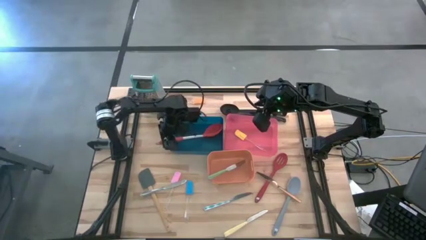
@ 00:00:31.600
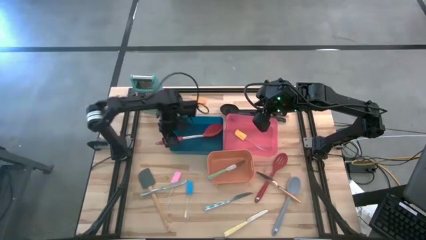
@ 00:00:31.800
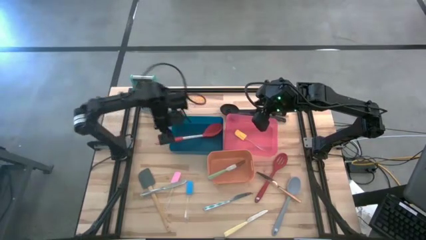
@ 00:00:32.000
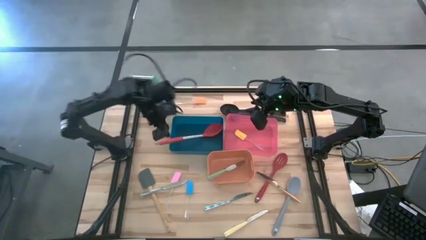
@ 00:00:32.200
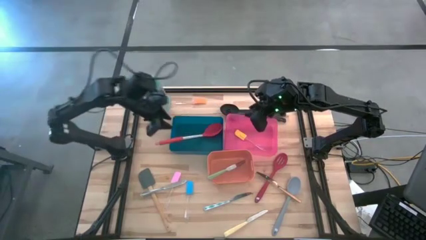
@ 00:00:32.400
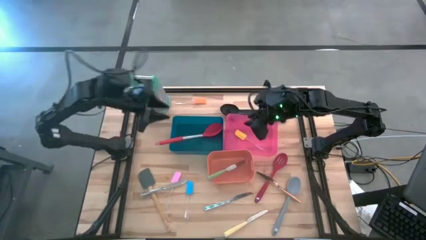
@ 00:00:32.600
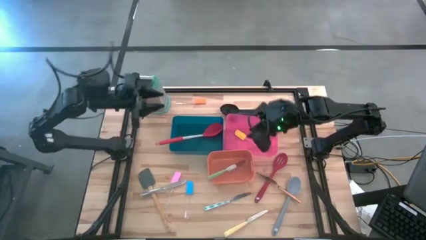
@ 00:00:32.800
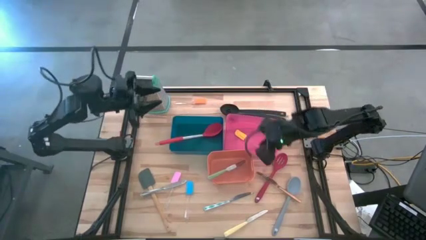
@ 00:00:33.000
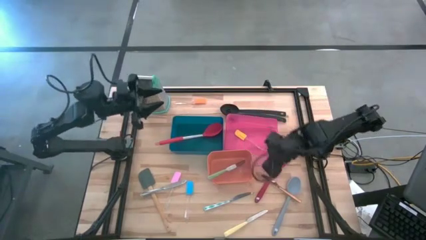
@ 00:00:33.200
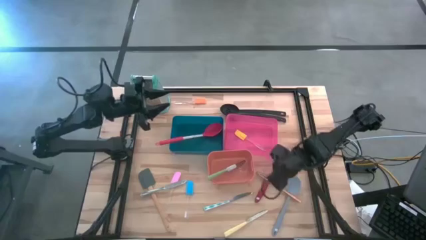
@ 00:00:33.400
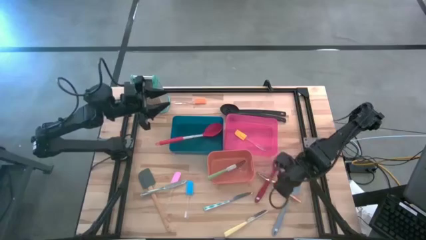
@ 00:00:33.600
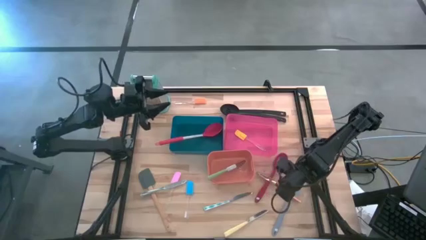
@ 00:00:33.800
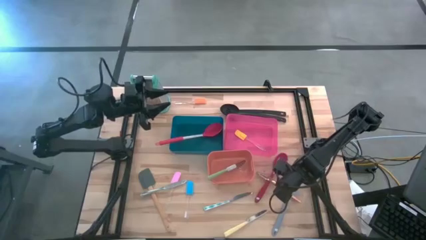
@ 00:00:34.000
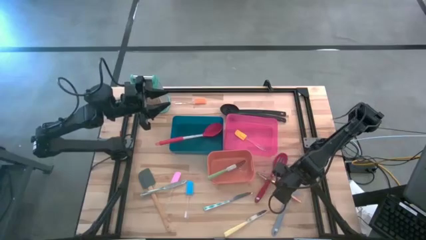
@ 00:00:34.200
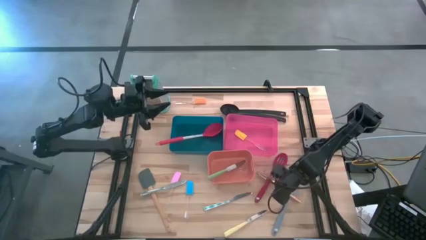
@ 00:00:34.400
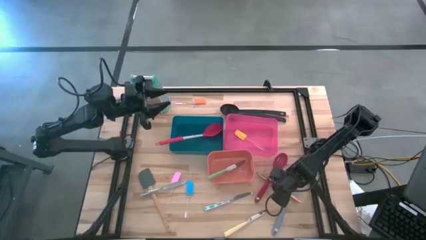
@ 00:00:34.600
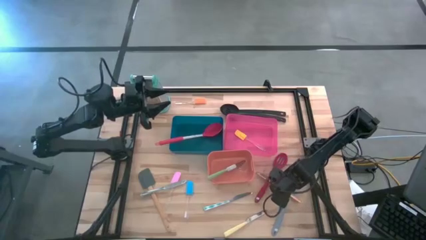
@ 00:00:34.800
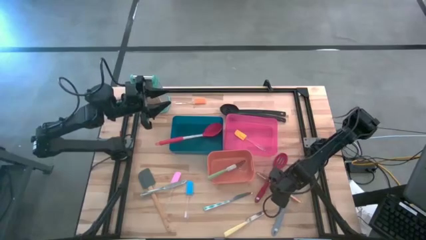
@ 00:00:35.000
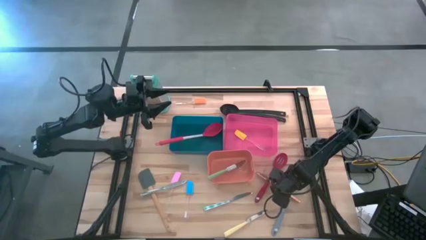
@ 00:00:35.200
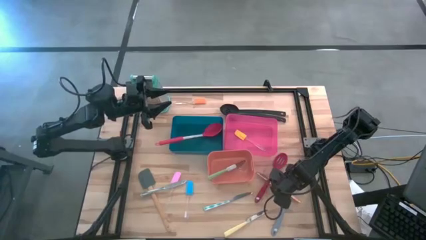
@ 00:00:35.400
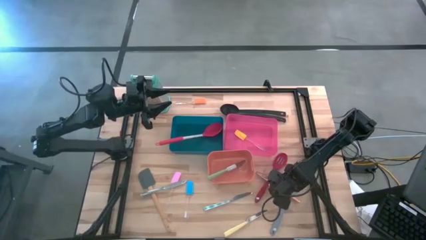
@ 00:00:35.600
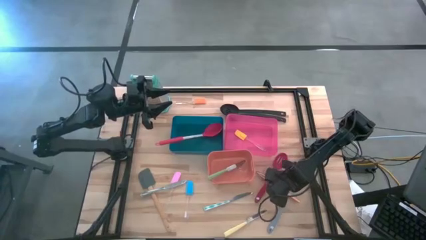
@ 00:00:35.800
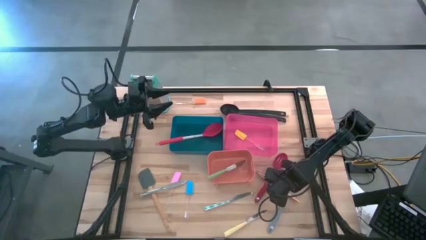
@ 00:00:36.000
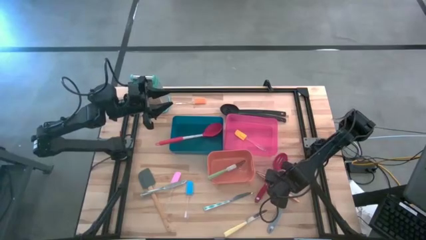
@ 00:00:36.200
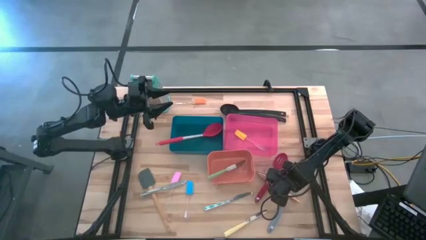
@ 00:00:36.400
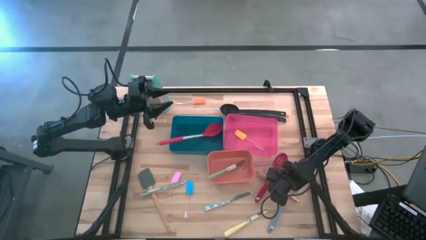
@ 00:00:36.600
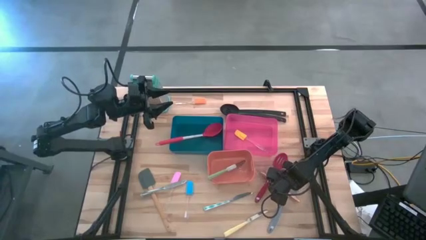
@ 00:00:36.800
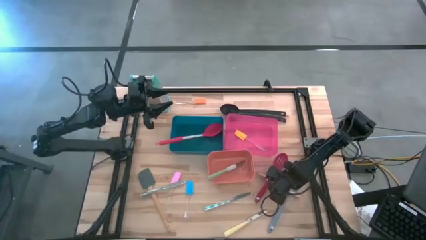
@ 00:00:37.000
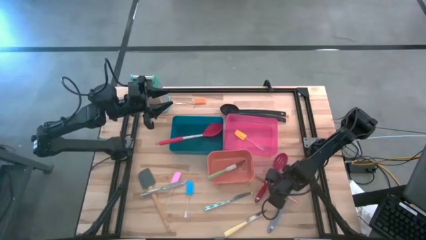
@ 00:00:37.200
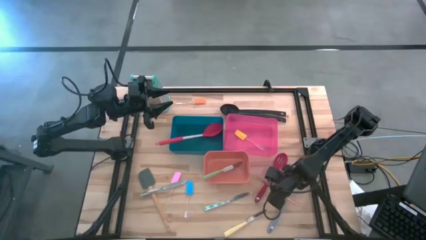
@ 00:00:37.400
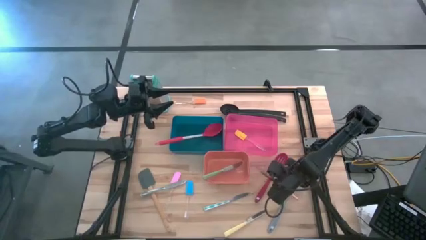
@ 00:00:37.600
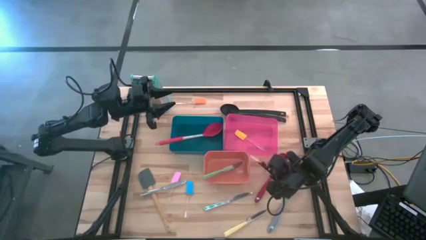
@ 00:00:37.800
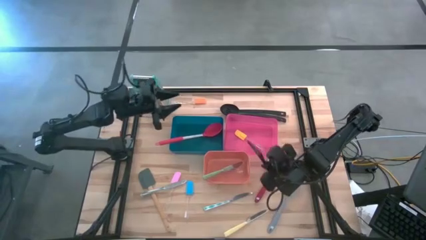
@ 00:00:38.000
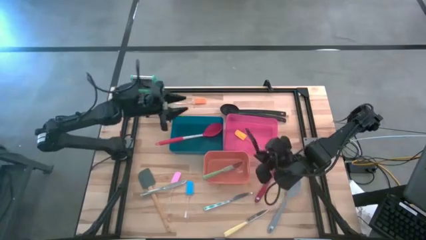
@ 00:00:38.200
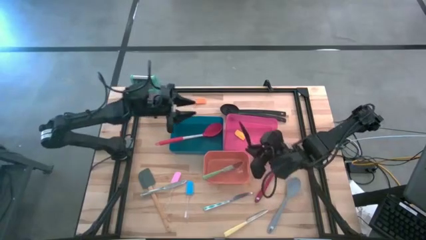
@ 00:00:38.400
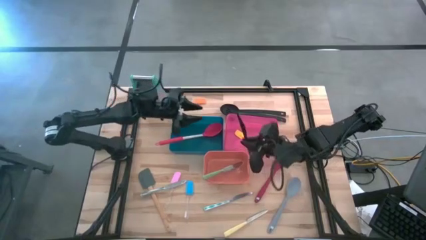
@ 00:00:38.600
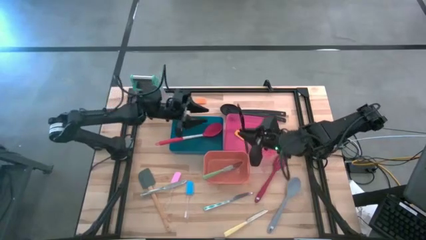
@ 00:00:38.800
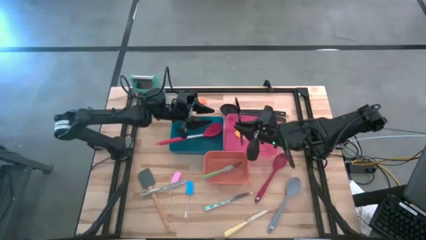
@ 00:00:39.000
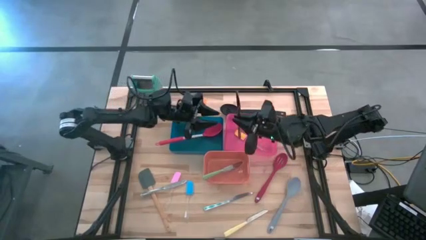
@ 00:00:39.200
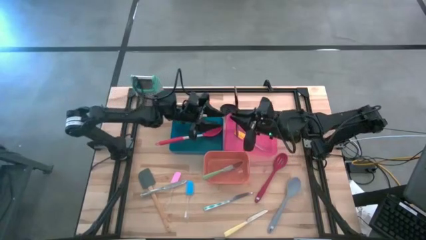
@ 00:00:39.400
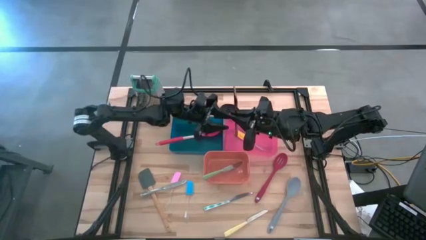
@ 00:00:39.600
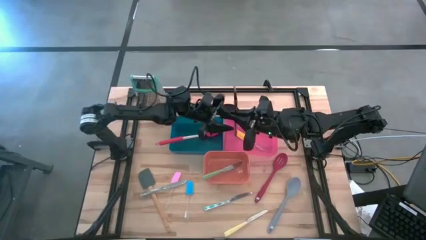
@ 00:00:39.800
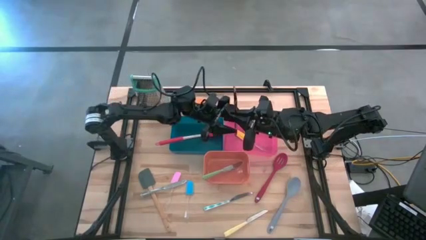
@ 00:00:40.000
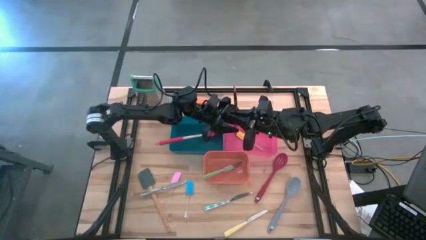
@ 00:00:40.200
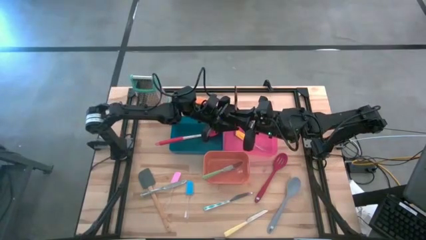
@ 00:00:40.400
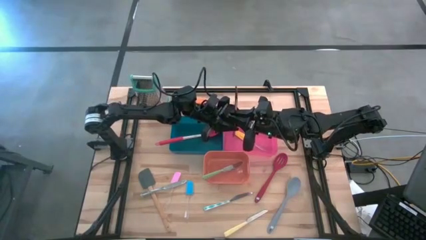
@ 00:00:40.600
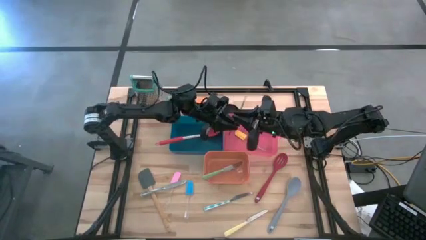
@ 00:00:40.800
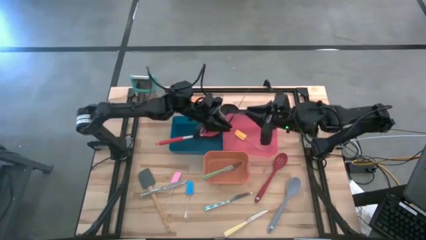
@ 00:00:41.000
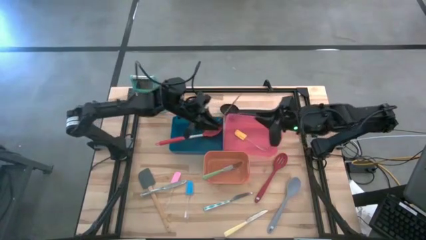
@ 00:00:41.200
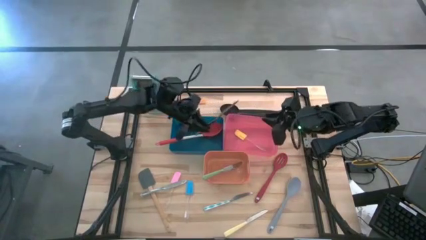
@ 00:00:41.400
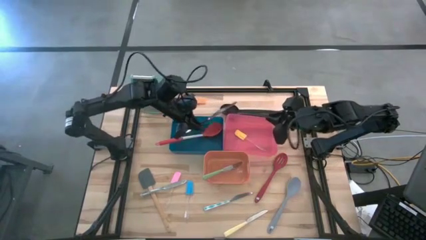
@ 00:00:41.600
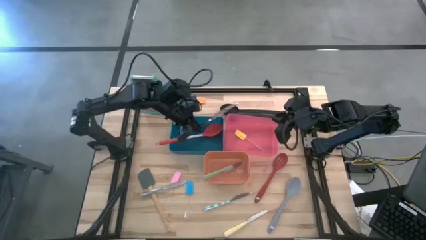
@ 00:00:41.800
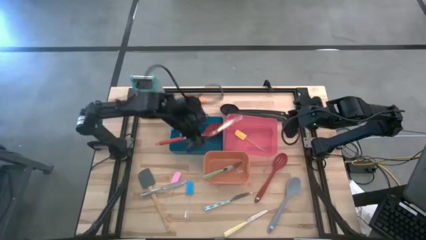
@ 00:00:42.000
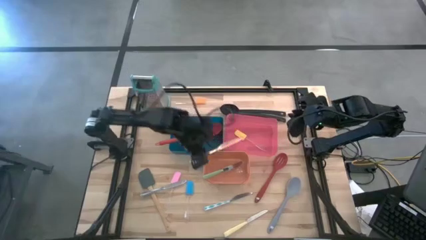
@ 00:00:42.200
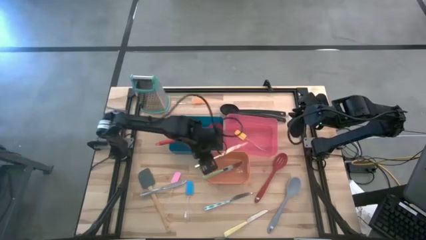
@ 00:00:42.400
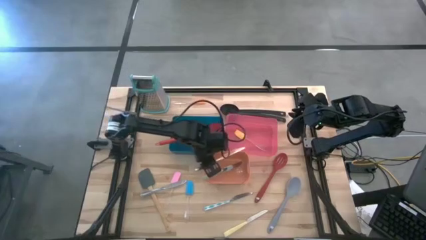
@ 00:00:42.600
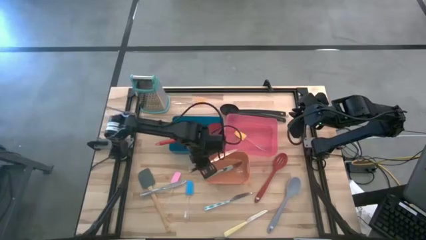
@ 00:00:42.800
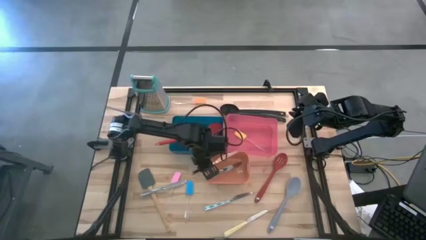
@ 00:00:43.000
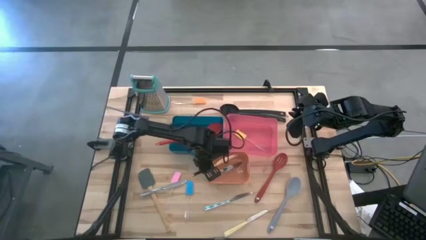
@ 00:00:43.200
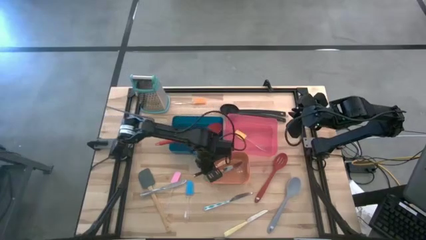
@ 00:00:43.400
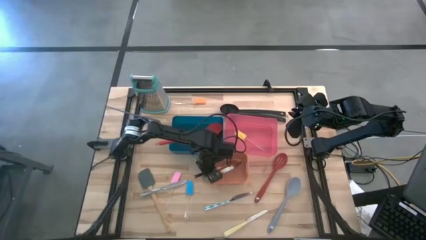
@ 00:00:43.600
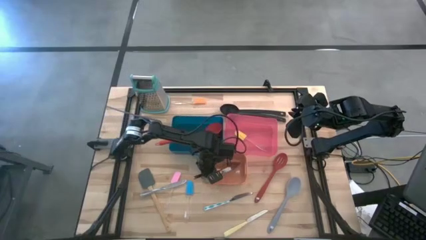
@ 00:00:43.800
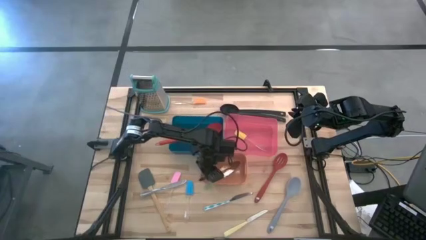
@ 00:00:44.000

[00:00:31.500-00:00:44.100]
Task: Pick & Place Kitchen Items
Put the gold knife into the orange bin

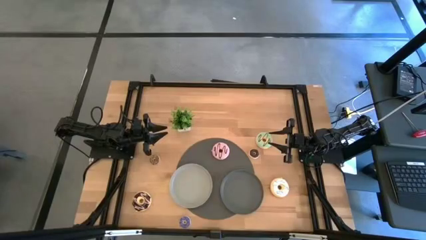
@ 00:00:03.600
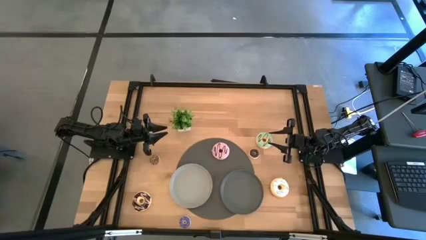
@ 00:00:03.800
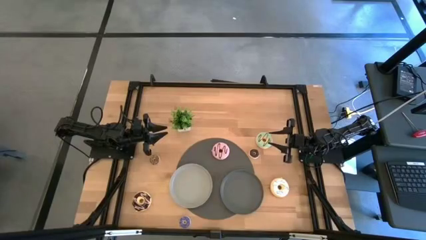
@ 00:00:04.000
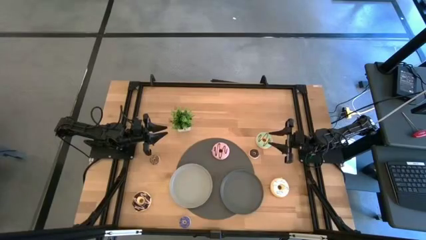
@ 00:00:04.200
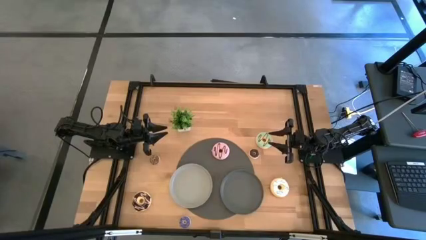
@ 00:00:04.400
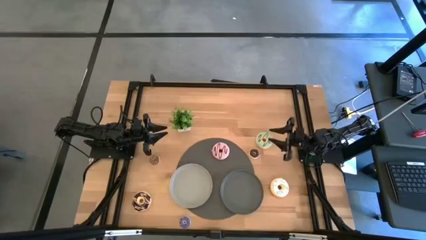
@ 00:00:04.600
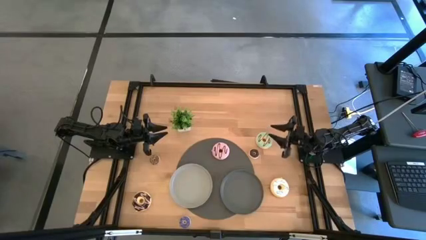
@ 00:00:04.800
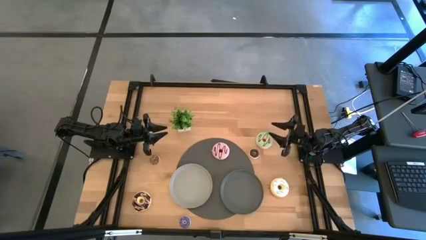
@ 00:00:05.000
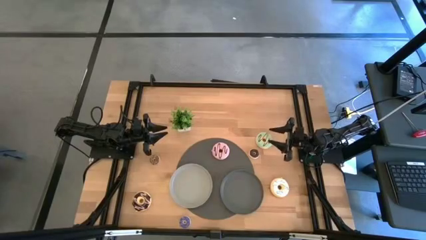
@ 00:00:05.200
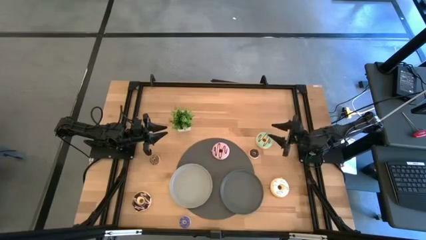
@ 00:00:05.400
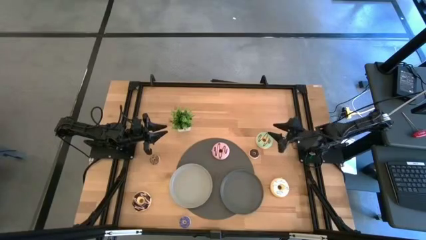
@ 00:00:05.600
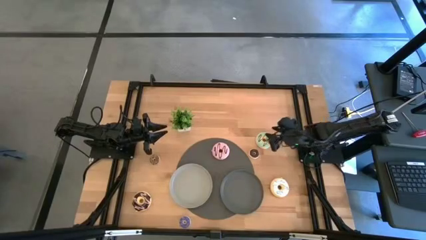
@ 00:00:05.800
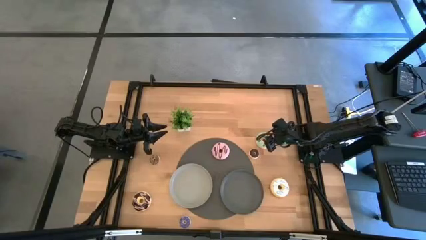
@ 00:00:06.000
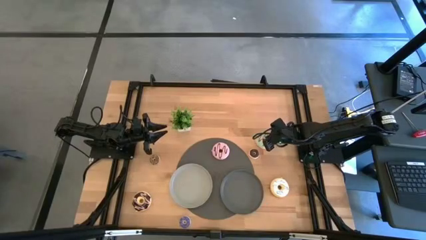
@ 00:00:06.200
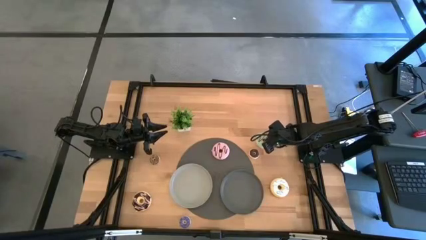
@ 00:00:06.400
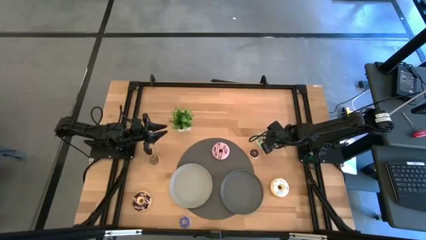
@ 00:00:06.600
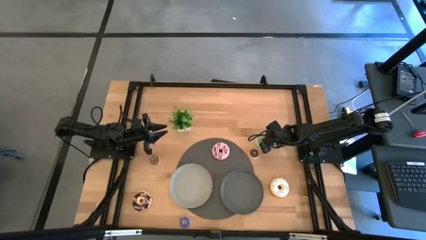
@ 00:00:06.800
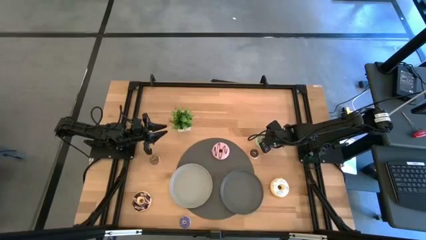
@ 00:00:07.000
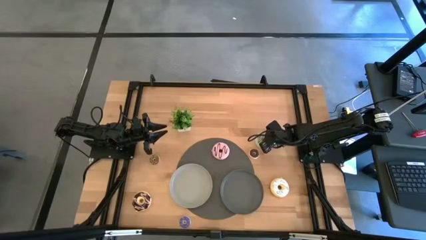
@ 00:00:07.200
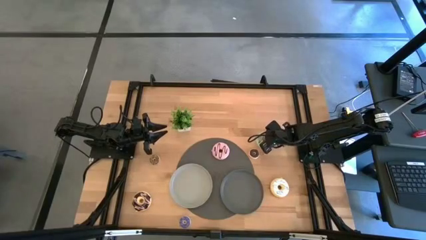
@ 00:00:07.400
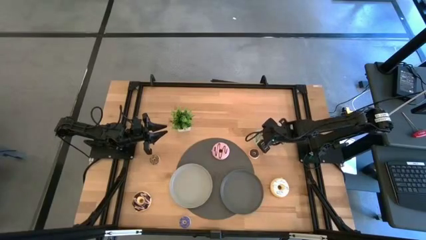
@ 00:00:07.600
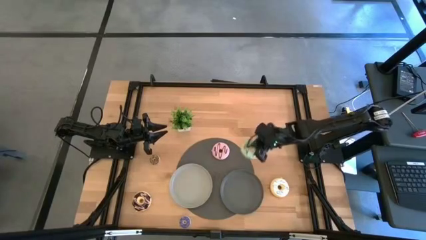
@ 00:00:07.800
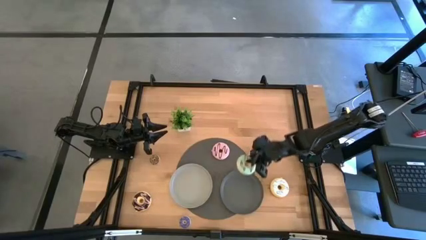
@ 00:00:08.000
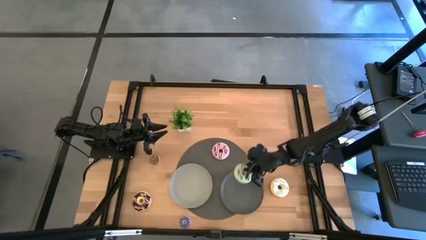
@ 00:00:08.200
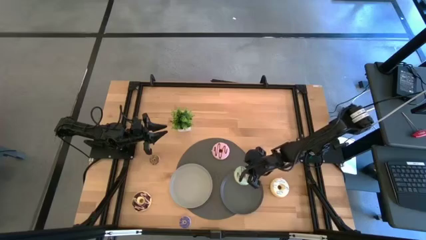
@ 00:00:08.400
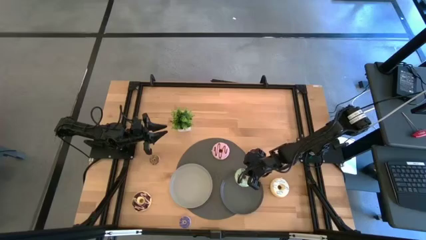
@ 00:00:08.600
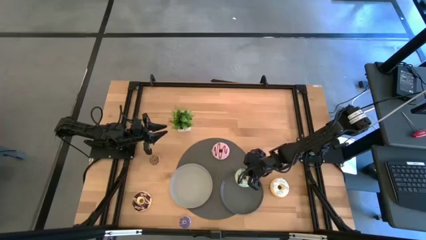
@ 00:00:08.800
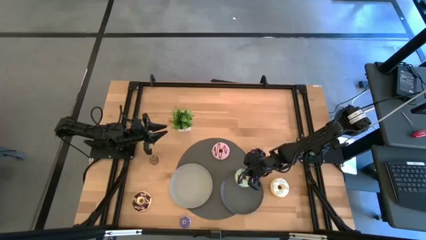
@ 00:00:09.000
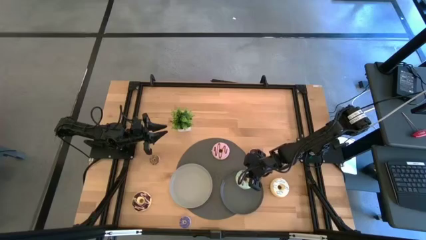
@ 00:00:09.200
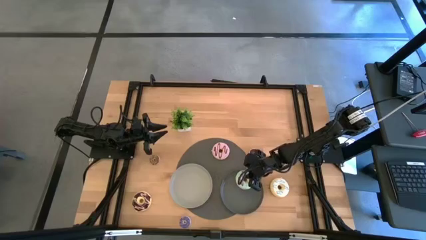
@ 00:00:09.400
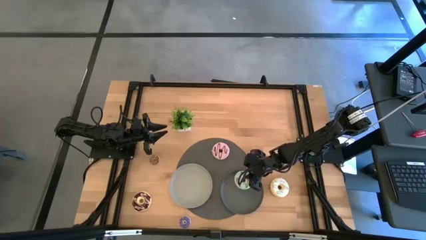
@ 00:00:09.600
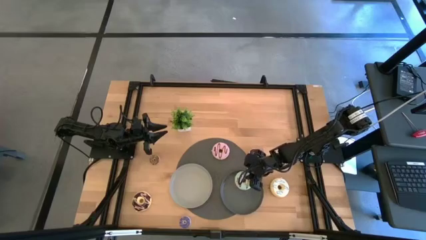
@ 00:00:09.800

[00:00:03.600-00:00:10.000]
Task: Pick & Place donuts
Put the large green donut on the dark grey plate
